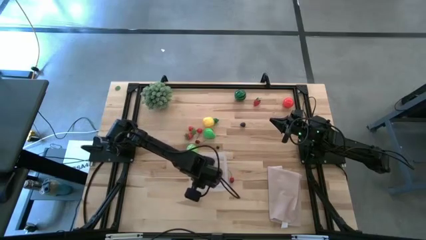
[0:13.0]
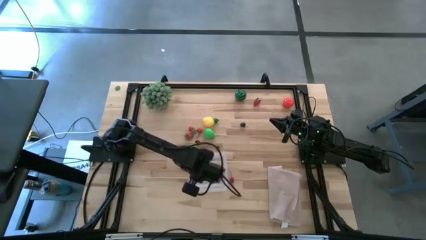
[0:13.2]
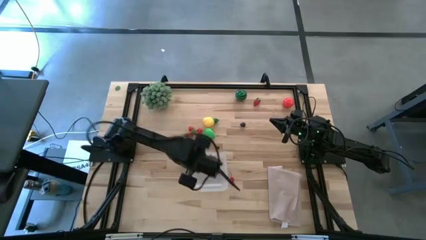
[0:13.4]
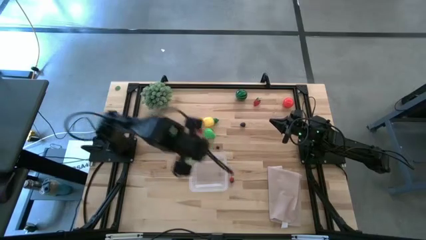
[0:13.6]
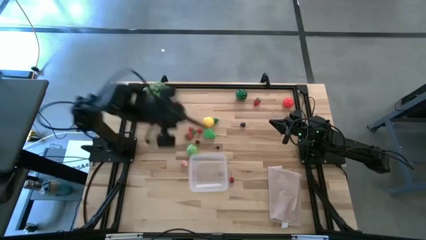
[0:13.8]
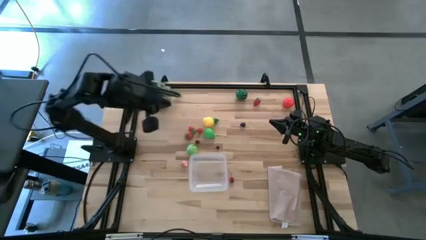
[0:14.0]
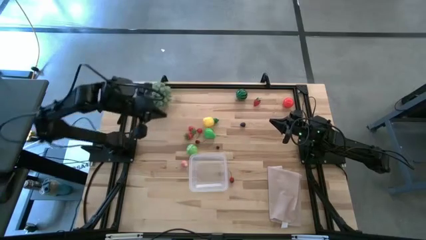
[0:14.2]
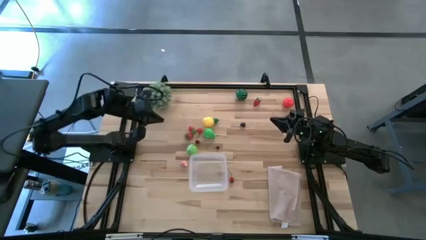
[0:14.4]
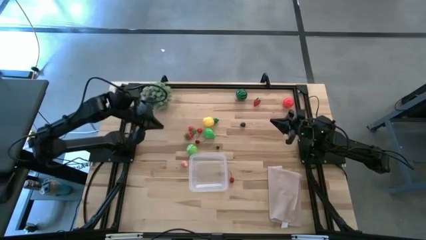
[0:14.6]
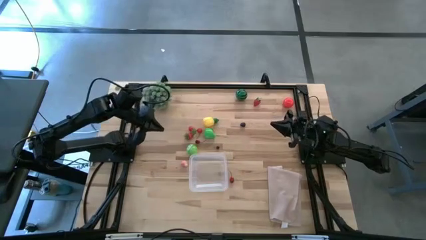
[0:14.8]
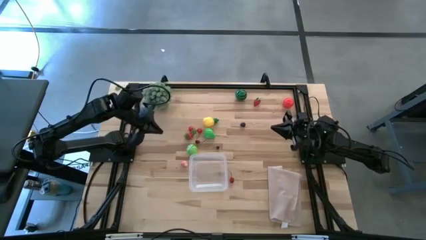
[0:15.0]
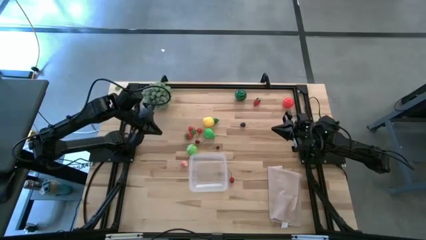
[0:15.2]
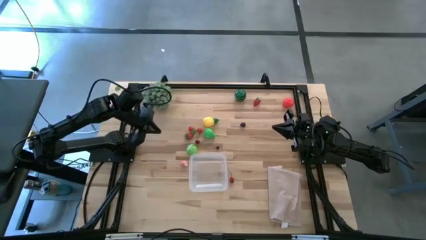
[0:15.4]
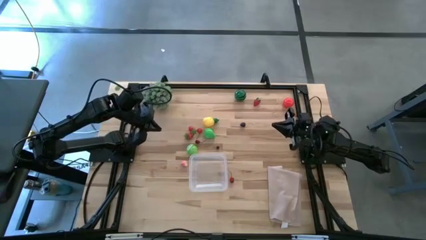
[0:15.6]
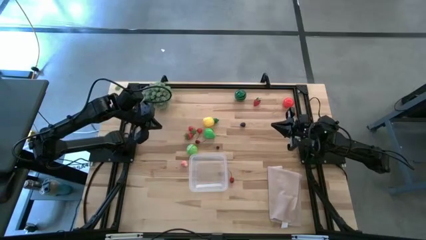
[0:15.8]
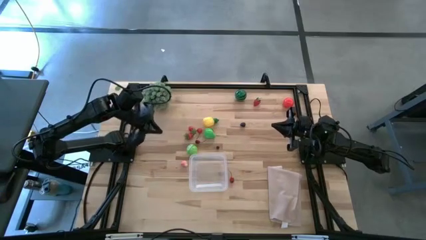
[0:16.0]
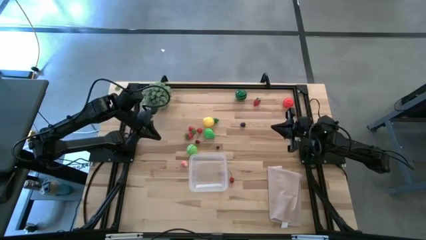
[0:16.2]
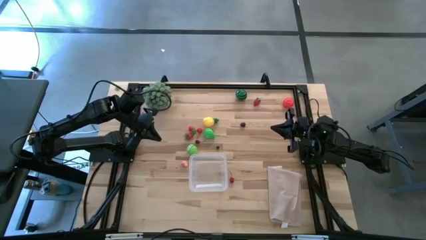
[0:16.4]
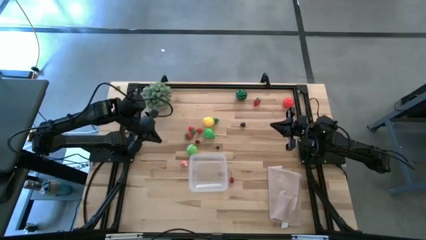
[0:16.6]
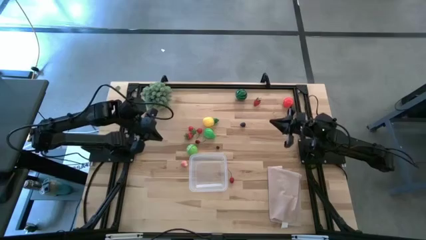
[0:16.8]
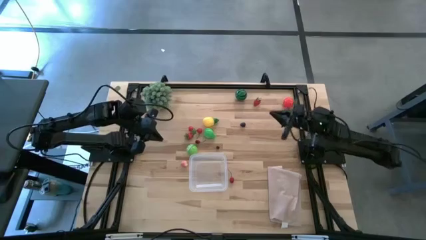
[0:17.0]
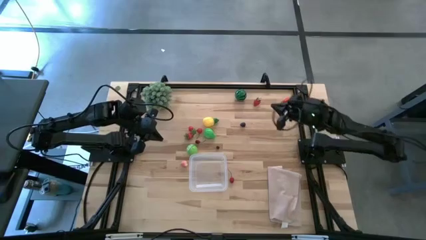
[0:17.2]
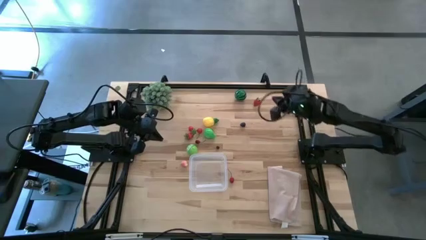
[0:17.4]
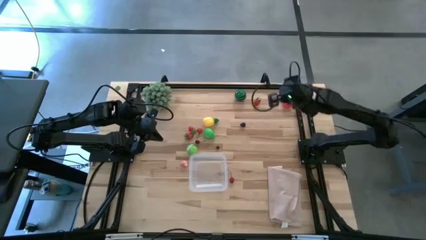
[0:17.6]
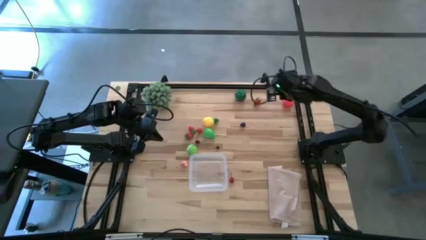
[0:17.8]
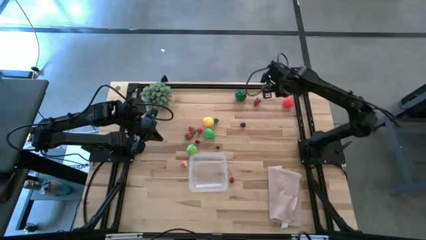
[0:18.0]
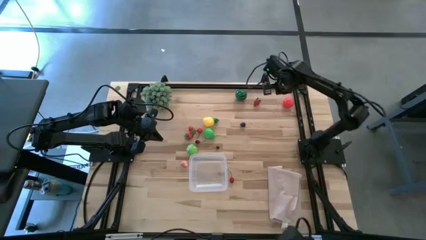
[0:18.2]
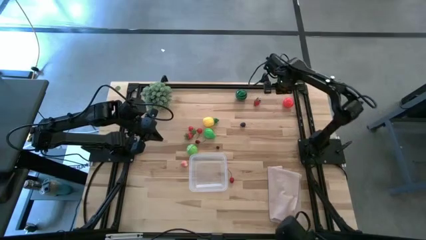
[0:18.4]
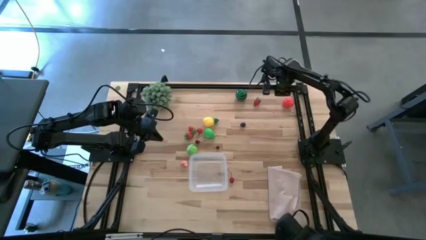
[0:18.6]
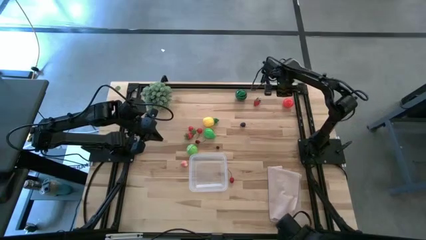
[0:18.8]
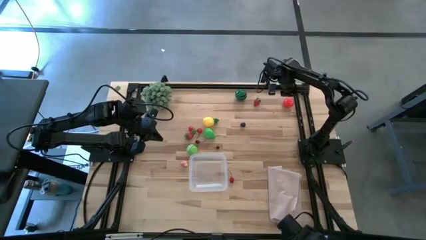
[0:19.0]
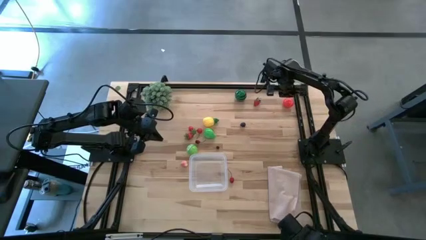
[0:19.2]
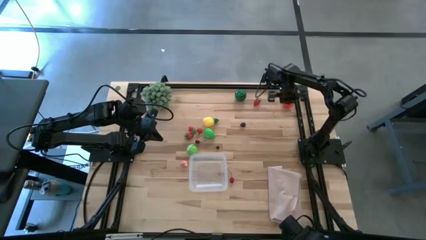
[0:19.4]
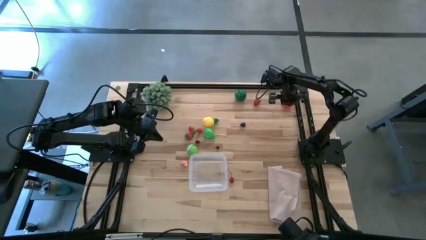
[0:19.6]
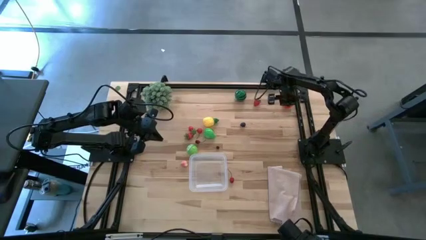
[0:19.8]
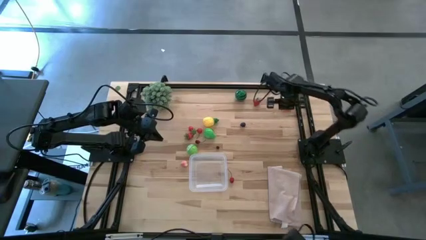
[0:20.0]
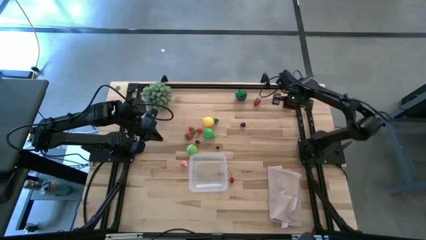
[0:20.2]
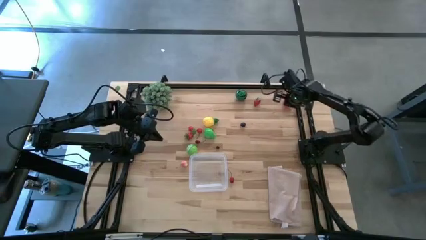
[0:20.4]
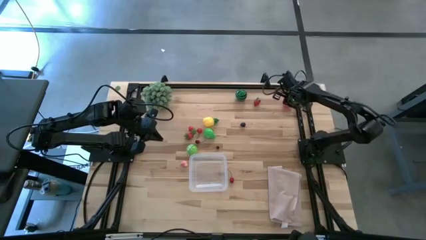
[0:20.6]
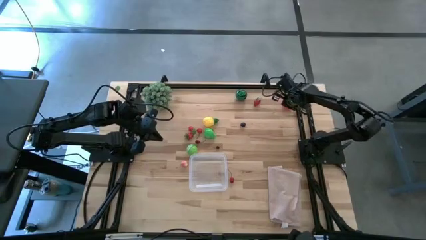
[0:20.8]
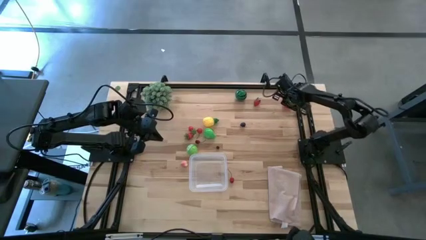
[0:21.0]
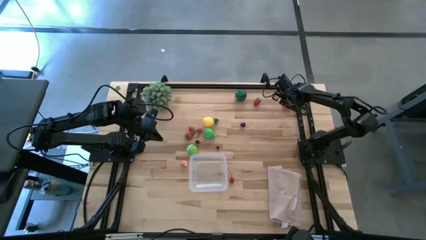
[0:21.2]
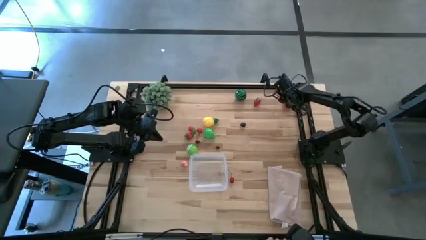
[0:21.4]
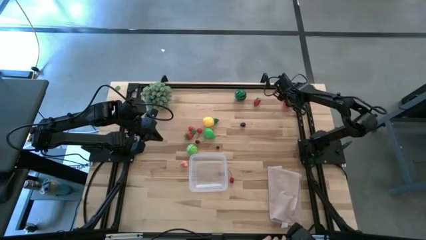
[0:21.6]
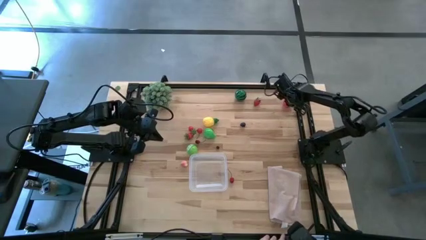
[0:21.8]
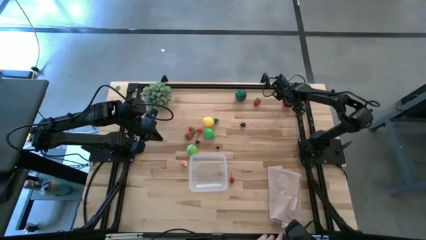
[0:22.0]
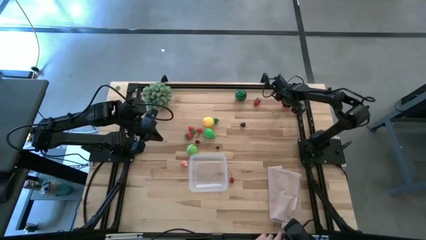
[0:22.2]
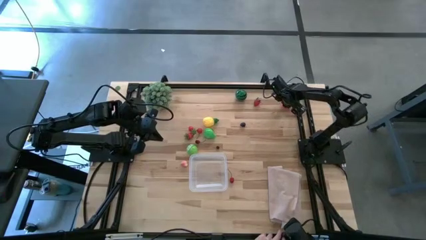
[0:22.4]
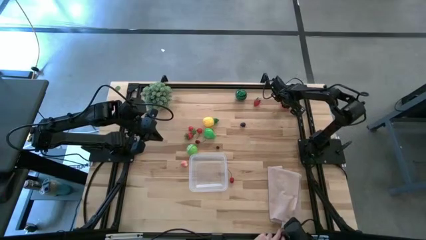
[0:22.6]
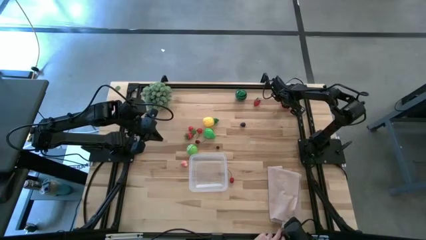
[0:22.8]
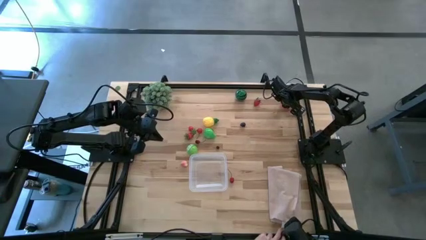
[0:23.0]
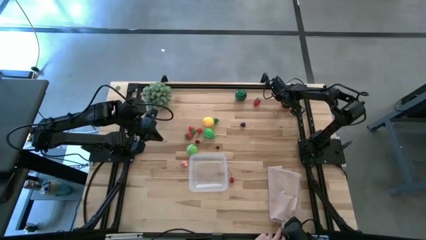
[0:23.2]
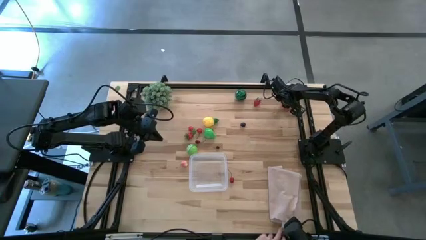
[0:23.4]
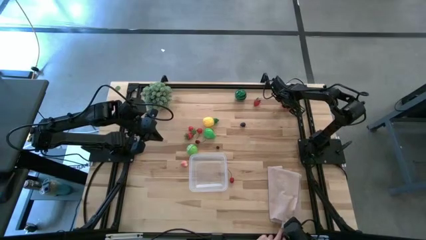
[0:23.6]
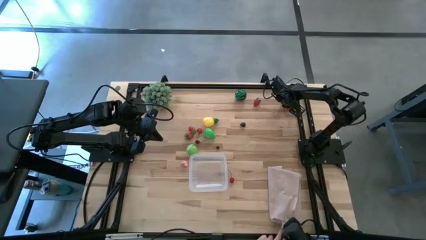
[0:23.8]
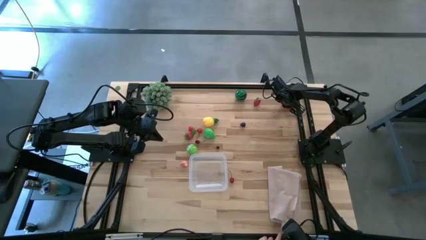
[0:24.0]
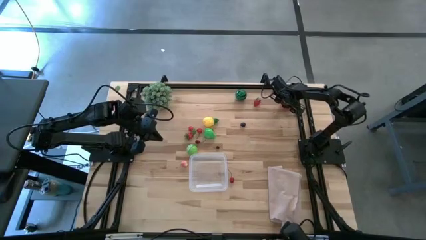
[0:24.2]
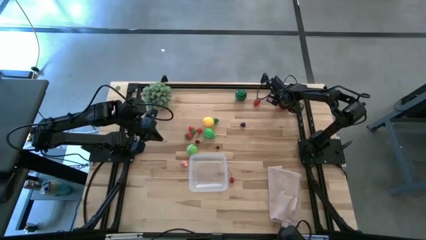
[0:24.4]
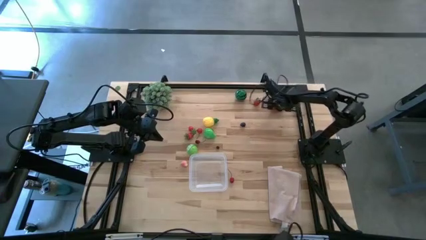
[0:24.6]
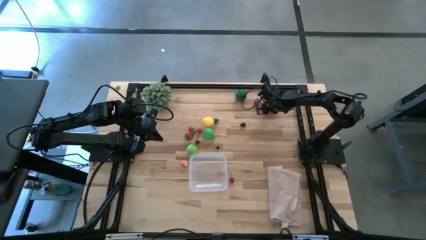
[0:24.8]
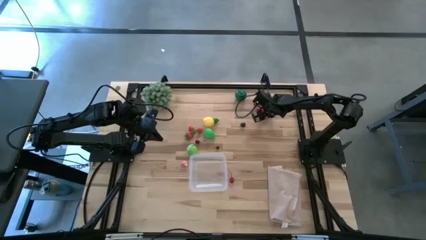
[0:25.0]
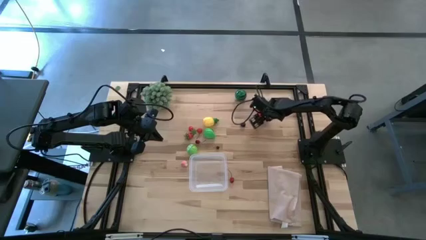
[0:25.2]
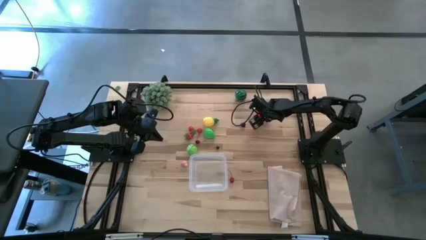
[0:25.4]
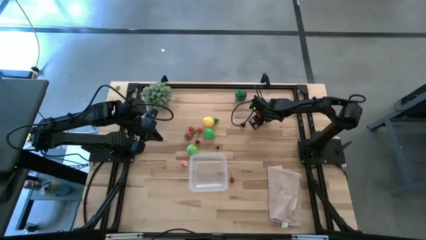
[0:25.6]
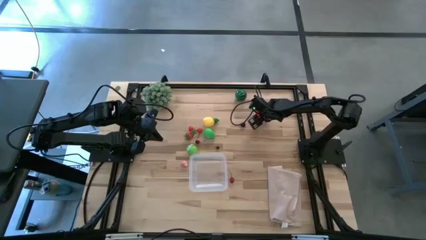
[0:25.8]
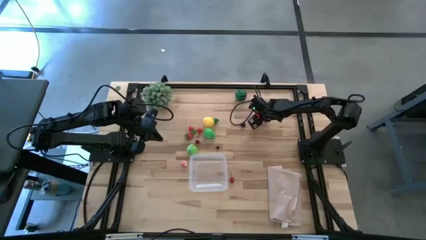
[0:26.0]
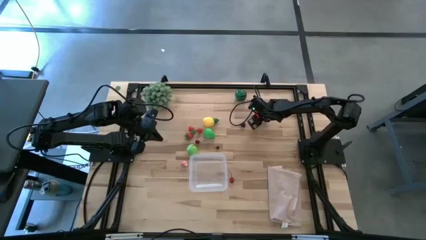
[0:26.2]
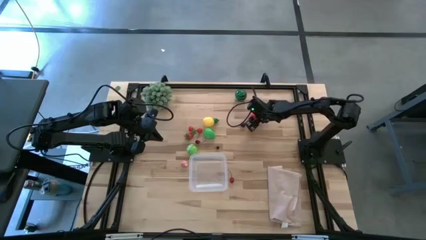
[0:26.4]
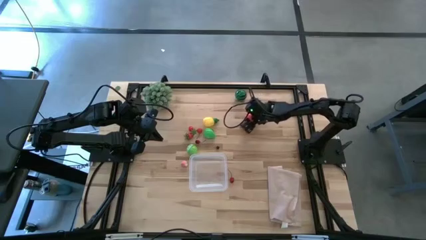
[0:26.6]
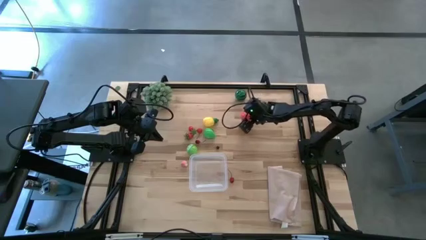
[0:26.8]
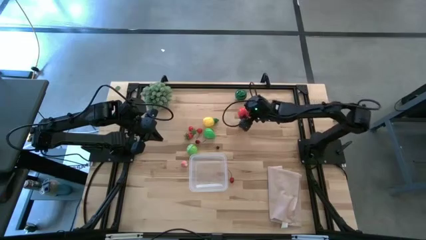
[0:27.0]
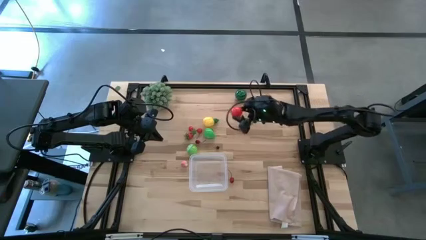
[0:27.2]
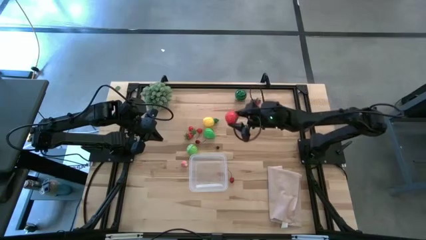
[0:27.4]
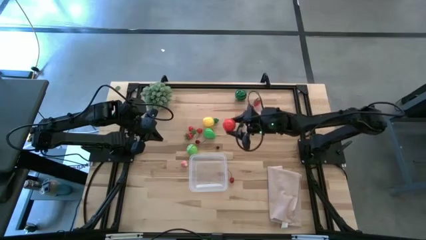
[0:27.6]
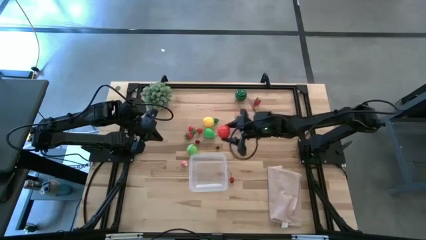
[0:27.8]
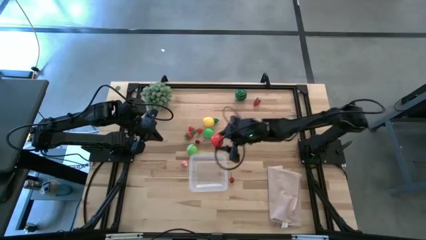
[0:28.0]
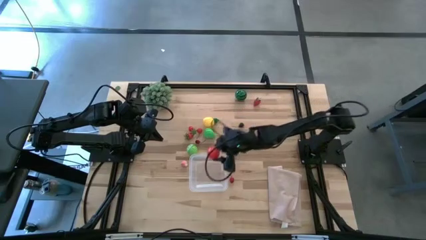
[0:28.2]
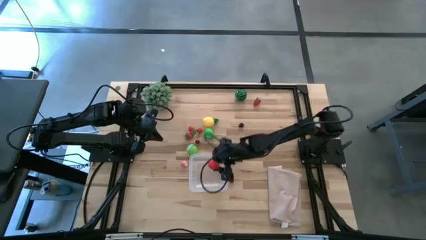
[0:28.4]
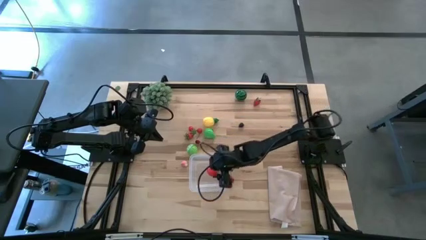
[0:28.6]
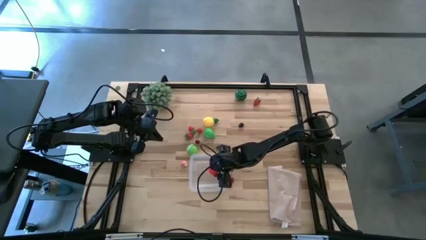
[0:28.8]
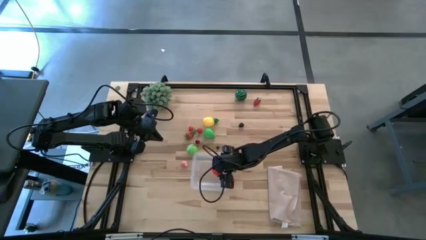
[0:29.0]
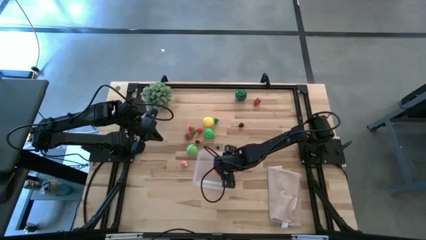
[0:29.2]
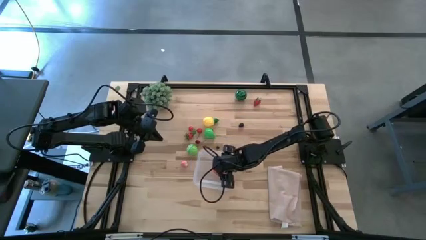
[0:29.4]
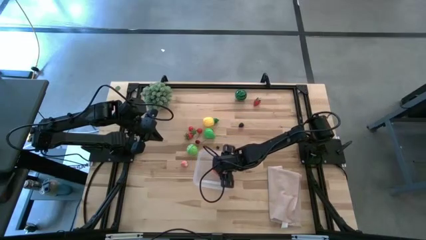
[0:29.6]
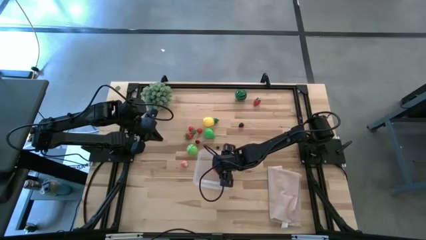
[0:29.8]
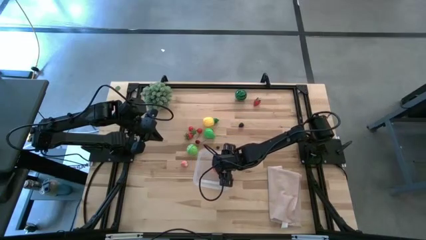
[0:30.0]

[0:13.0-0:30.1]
Task: Pick and placing Produce into tupperware
Put the red tomato into the transparent bin
